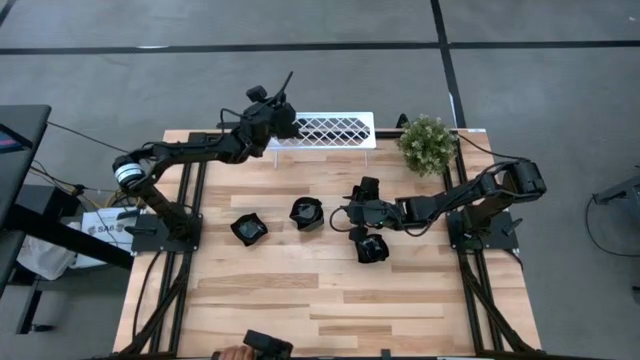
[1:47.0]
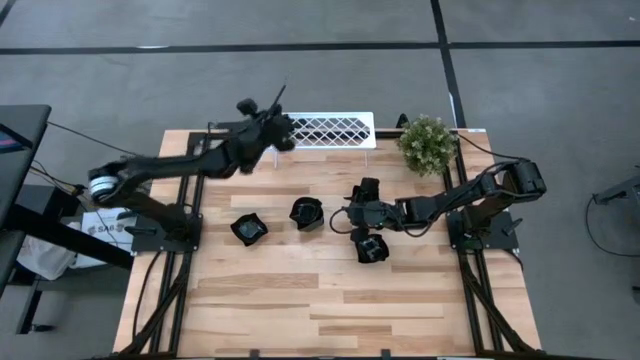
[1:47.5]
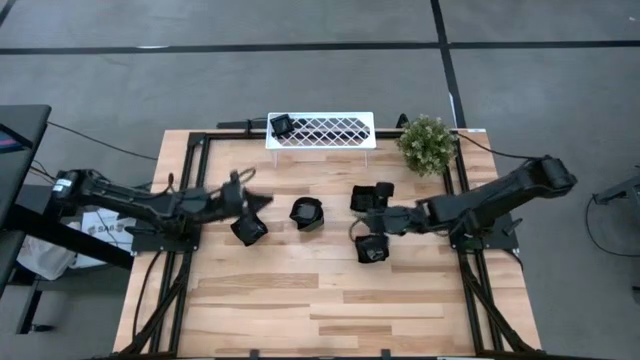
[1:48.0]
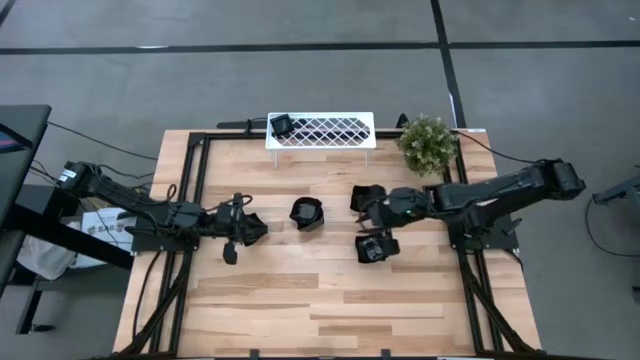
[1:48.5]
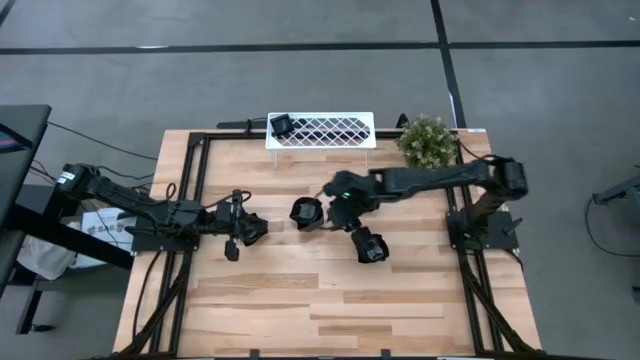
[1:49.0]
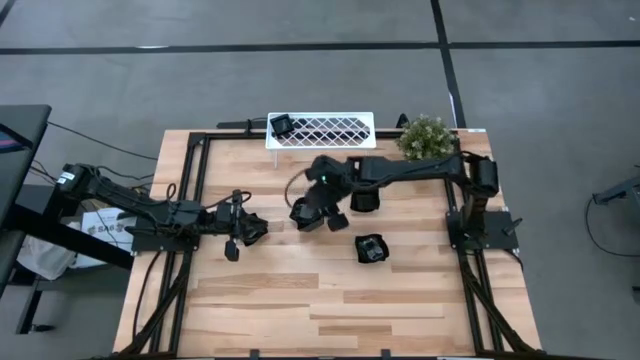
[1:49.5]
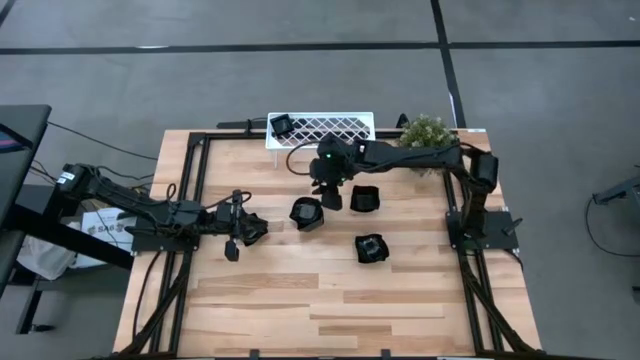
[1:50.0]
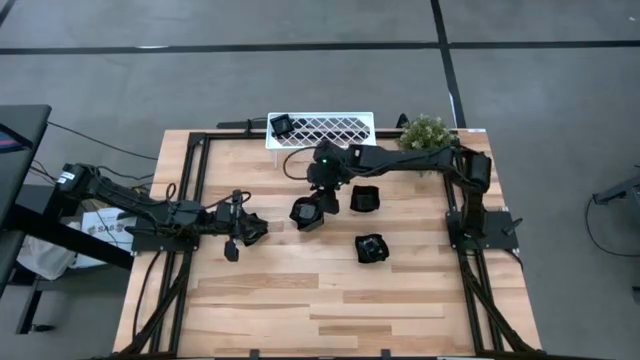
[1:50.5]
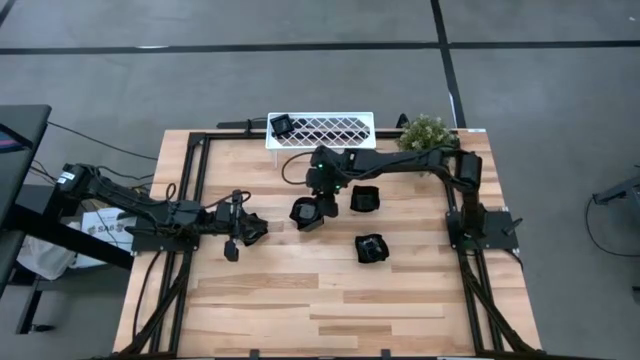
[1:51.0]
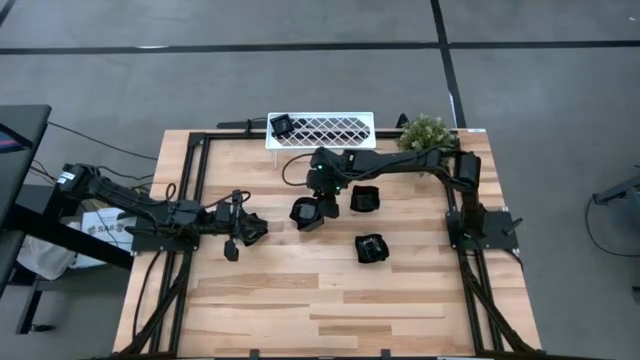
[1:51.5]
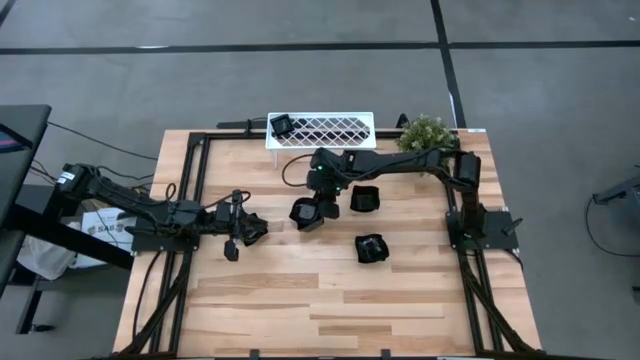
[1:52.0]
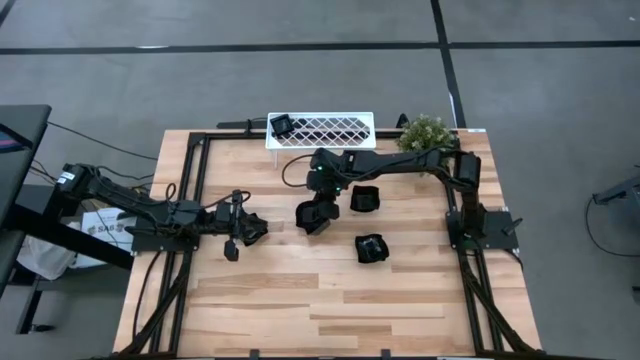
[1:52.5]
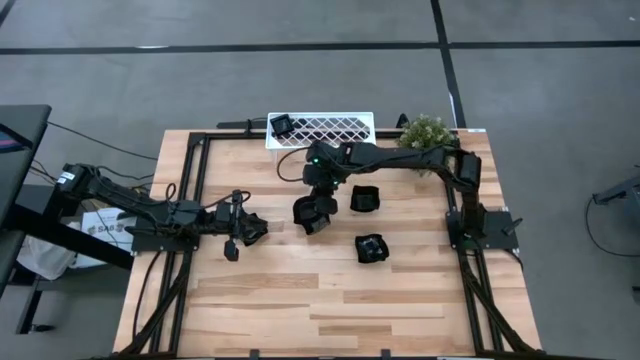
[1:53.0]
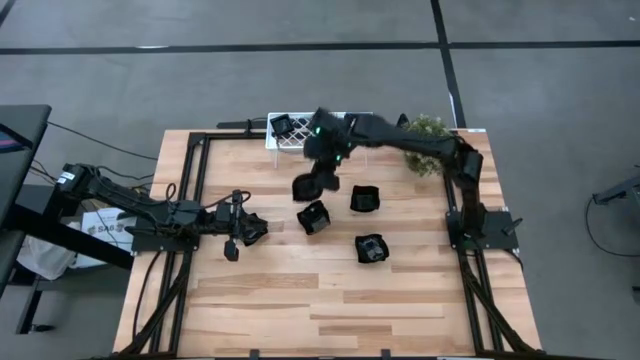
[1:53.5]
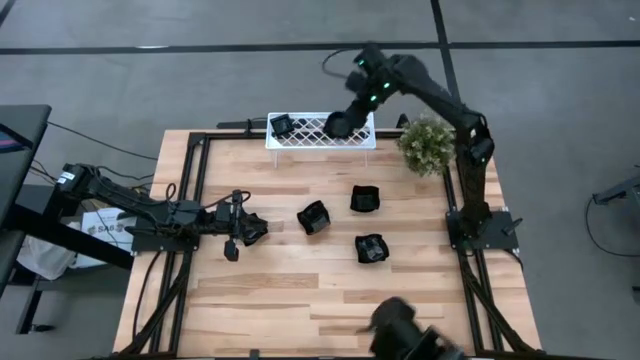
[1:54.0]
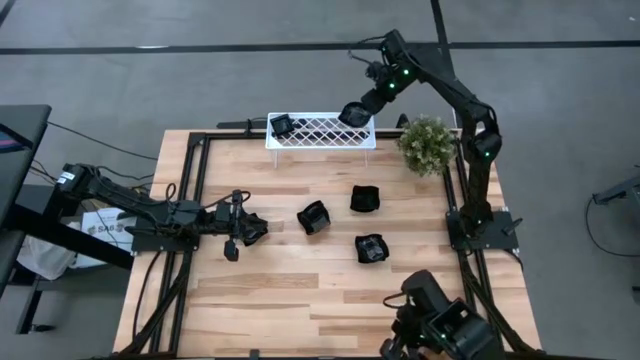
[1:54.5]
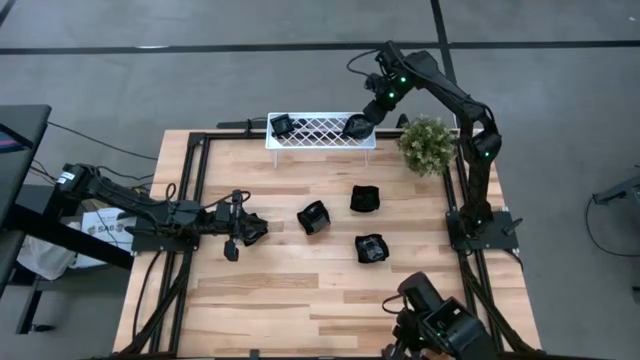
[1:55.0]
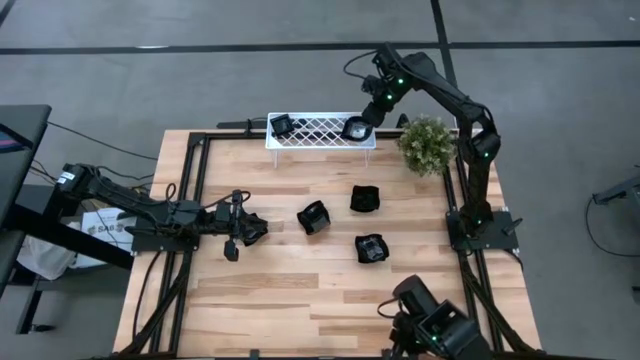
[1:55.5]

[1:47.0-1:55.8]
Task: Pick & Place Mini shaped plates
Put the black leaf shaped plate on the shelf

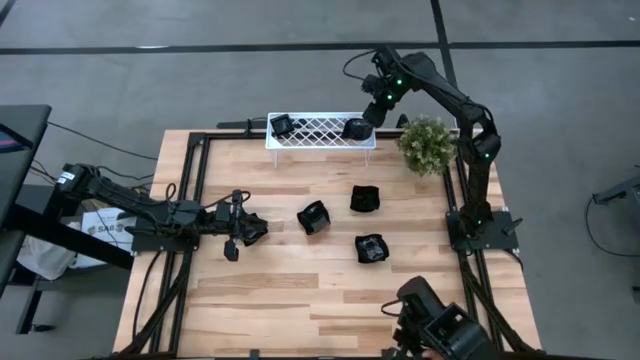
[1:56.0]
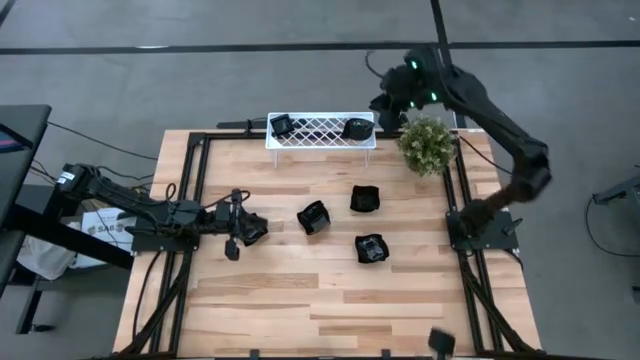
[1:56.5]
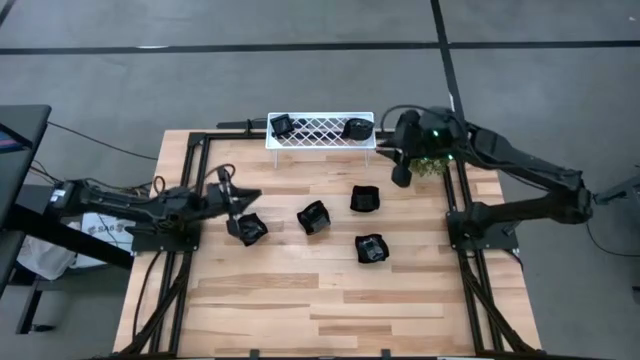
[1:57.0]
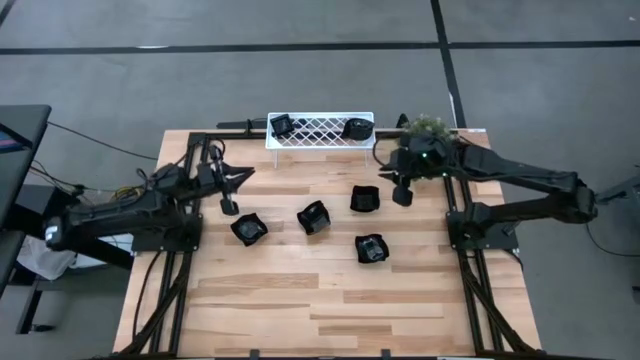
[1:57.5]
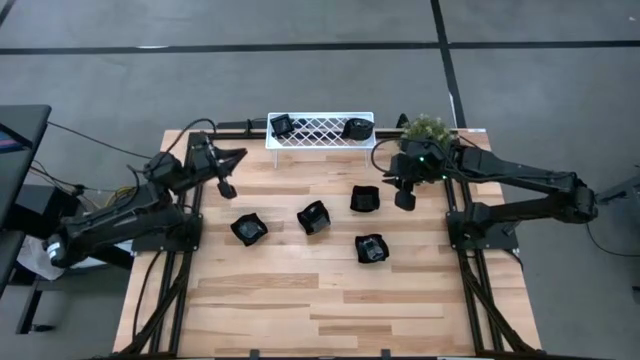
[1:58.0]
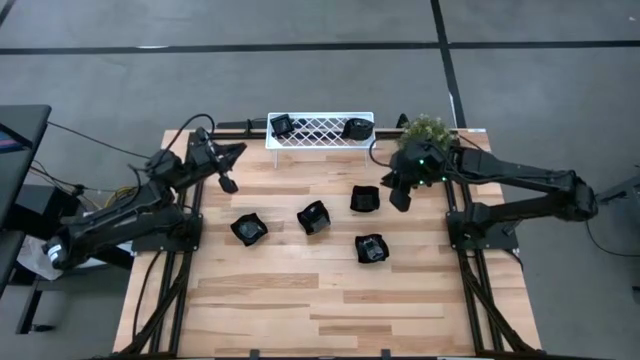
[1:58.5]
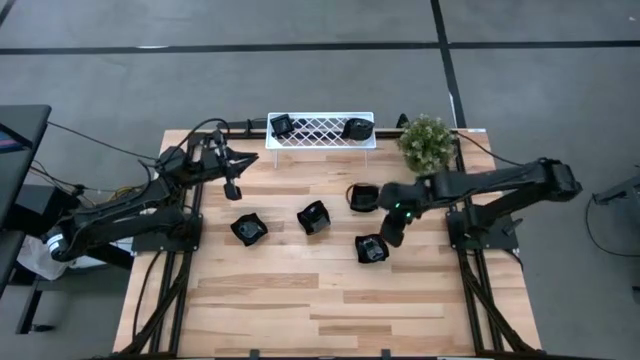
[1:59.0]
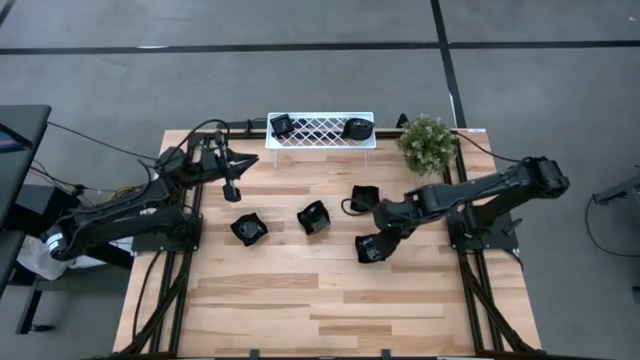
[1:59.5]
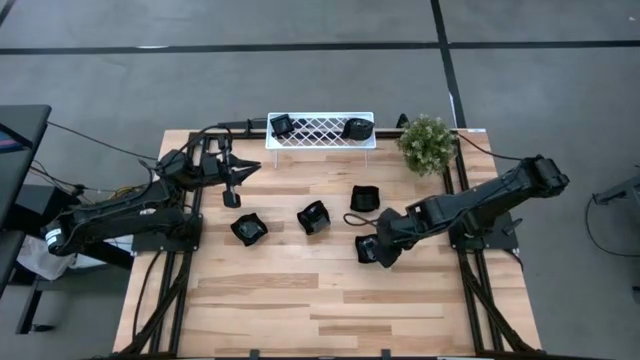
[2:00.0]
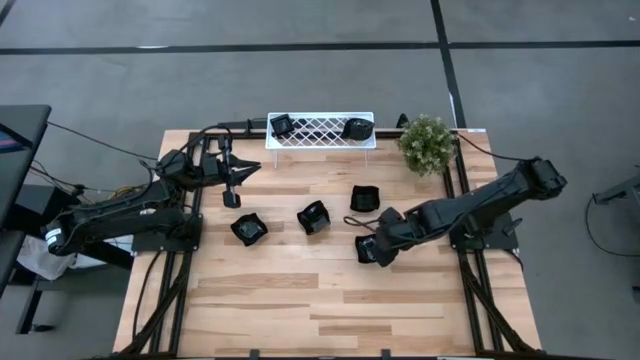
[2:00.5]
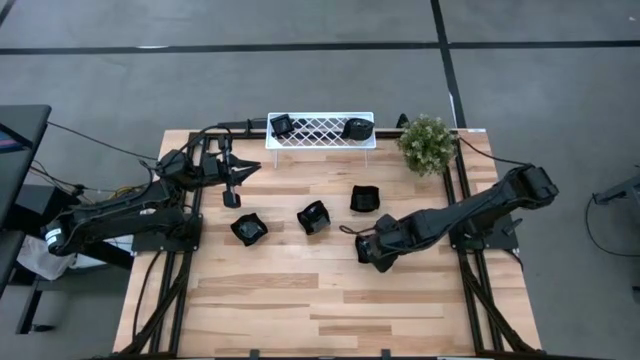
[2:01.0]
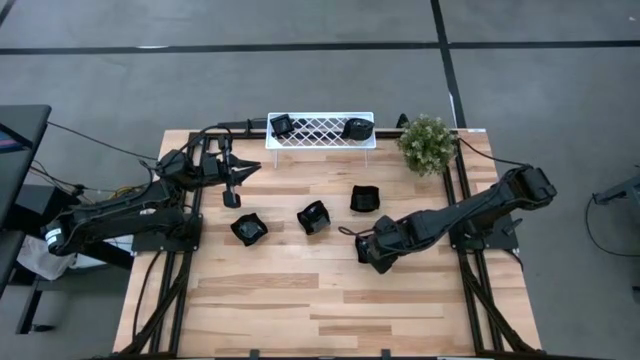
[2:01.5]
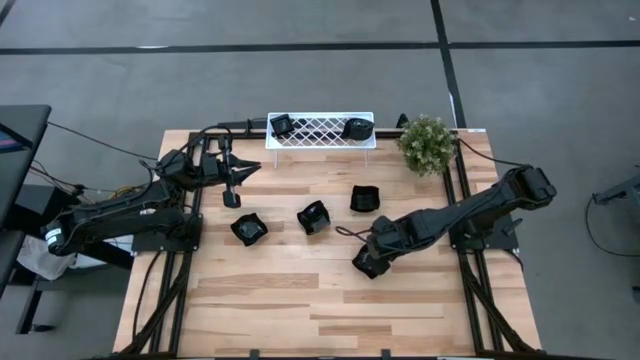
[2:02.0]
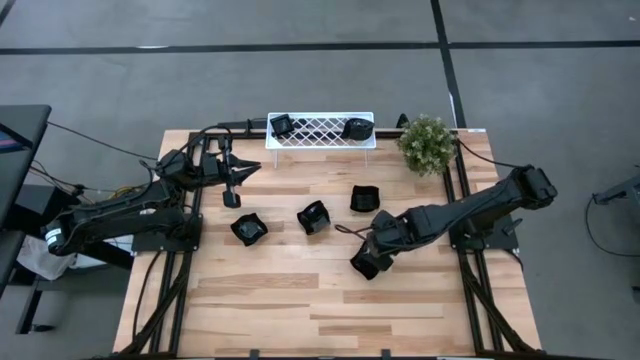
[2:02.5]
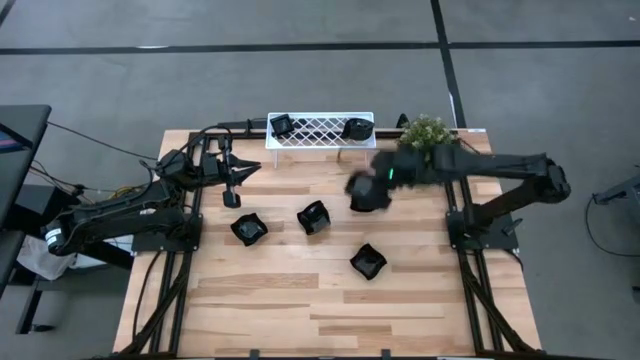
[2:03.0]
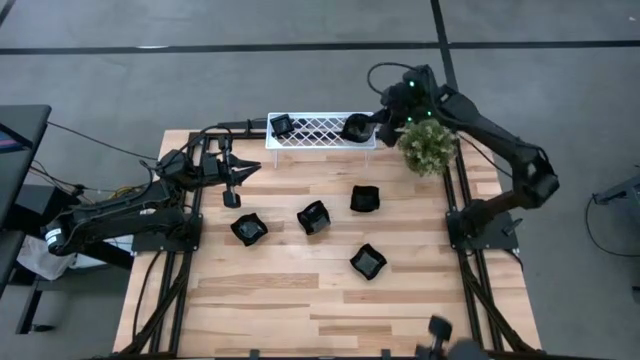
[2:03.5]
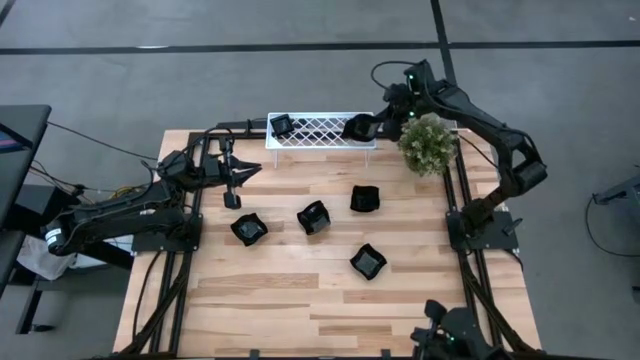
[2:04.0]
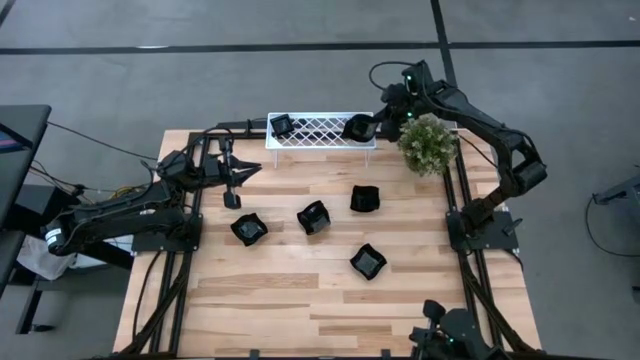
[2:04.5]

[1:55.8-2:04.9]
Stack the black leaf shaped plate on top of the black leaf shaped plate on the shelf

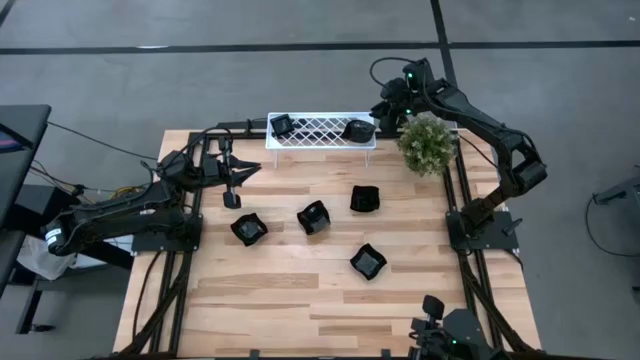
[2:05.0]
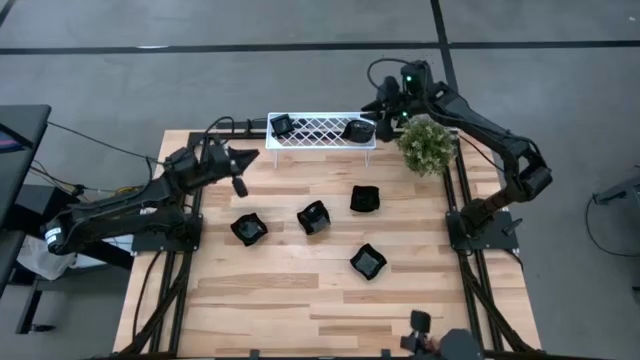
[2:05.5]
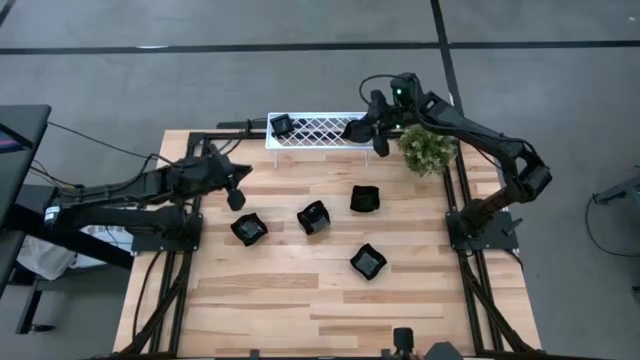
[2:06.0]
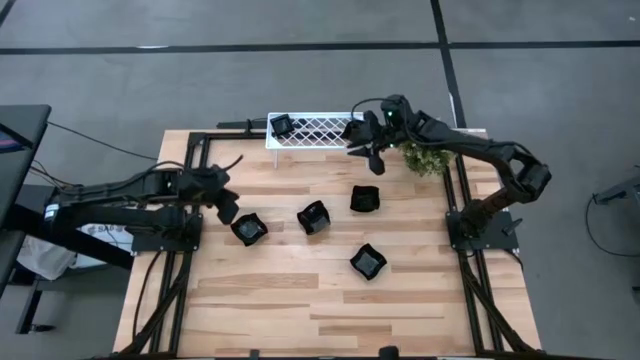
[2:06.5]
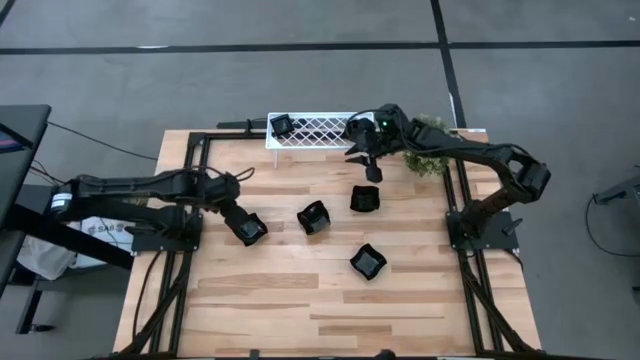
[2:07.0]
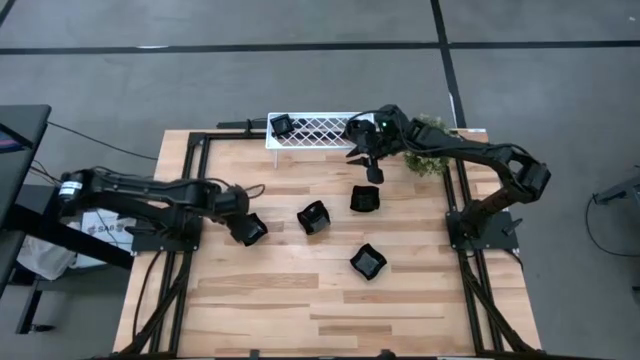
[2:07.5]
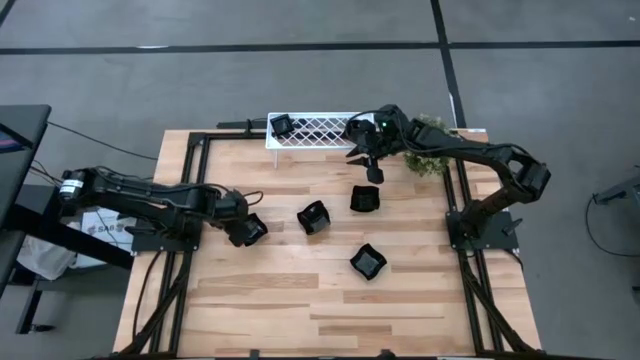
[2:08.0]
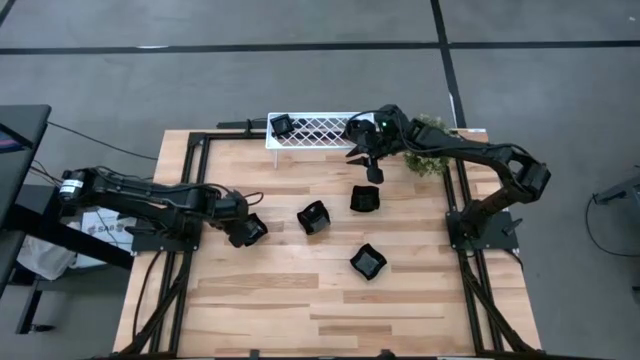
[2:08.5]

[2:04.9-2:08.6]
Stack the black leaf shaped plate on top of the black leaf shaped plate on the shelf
